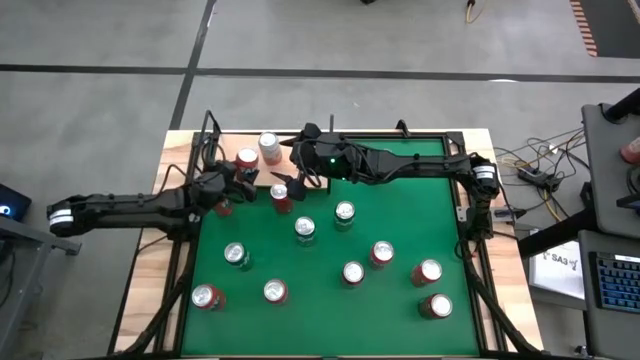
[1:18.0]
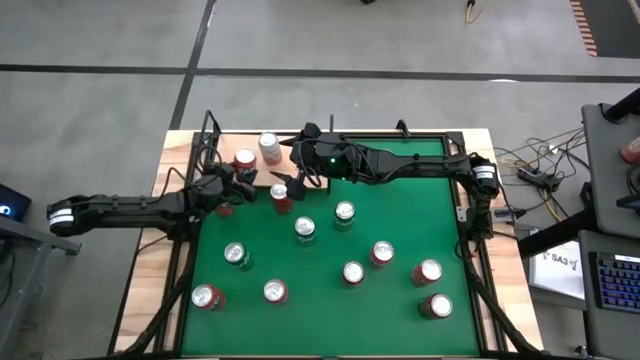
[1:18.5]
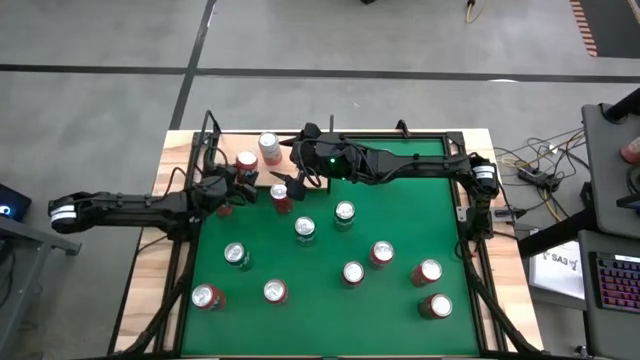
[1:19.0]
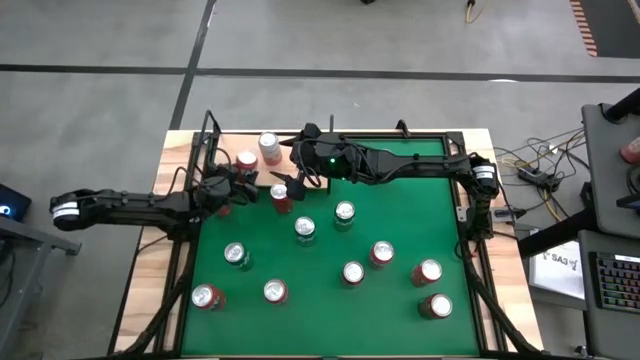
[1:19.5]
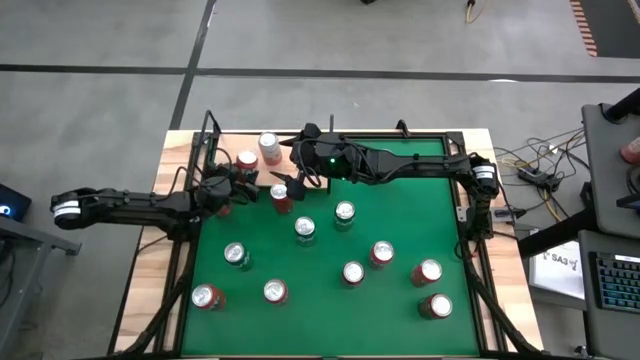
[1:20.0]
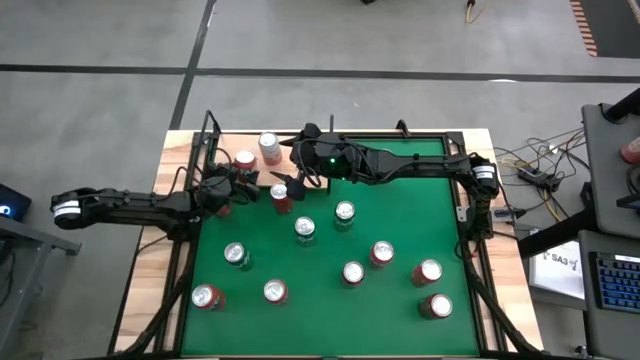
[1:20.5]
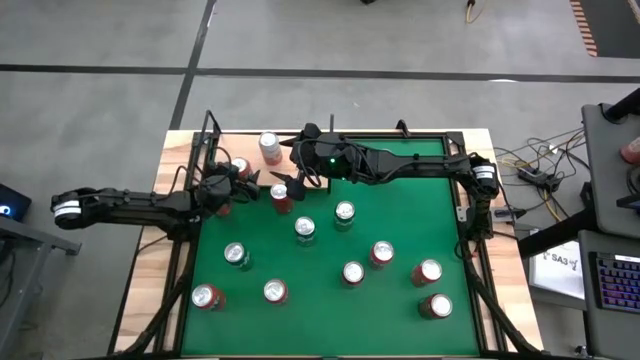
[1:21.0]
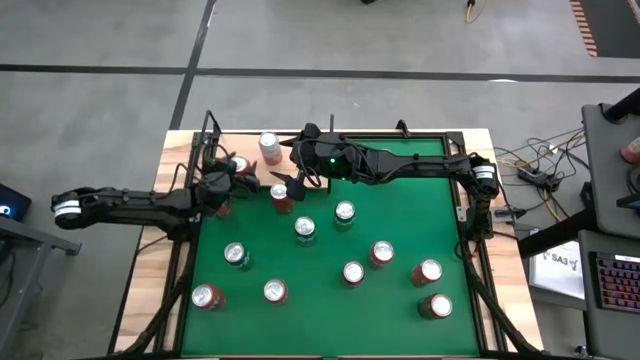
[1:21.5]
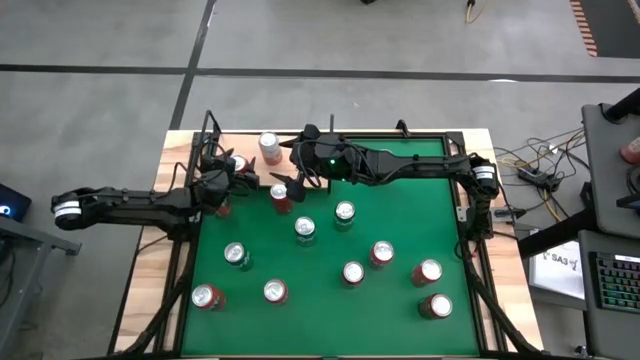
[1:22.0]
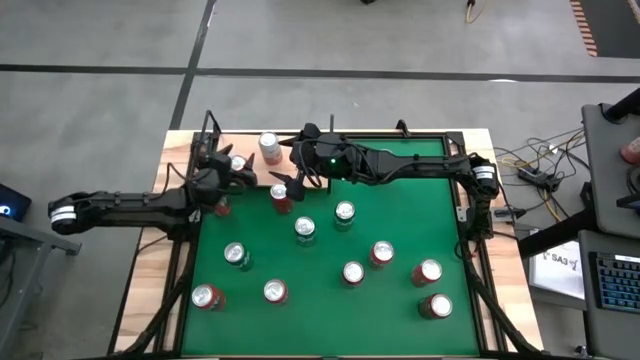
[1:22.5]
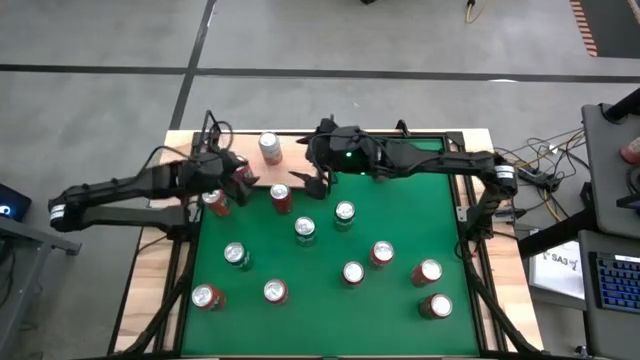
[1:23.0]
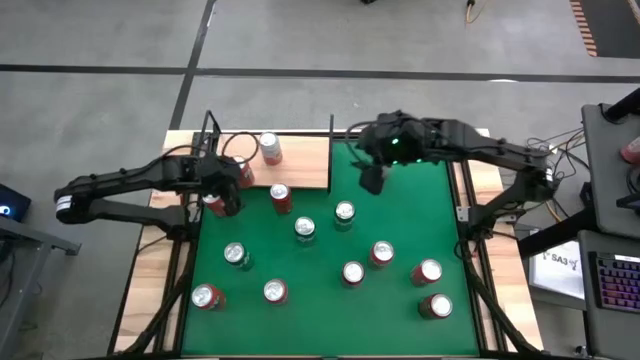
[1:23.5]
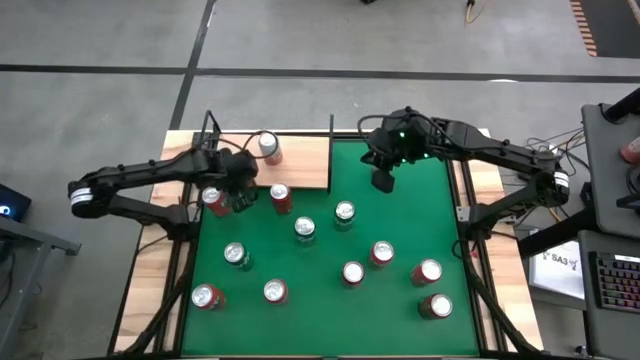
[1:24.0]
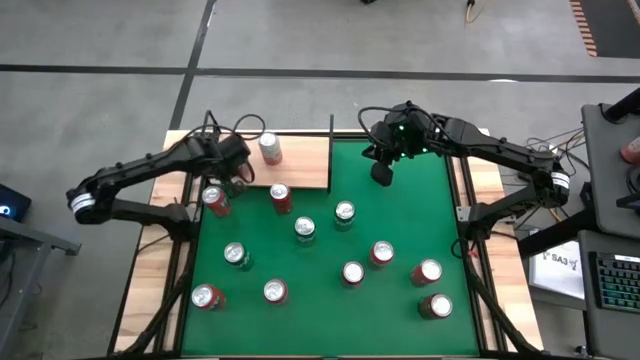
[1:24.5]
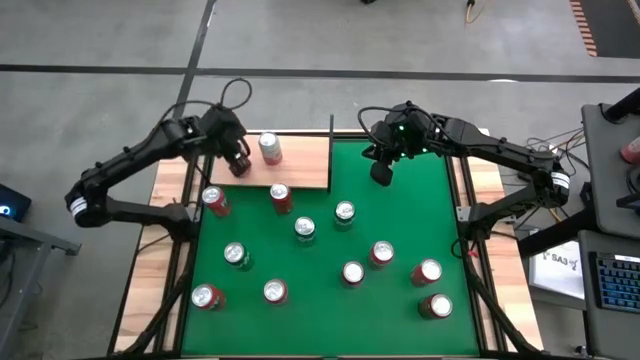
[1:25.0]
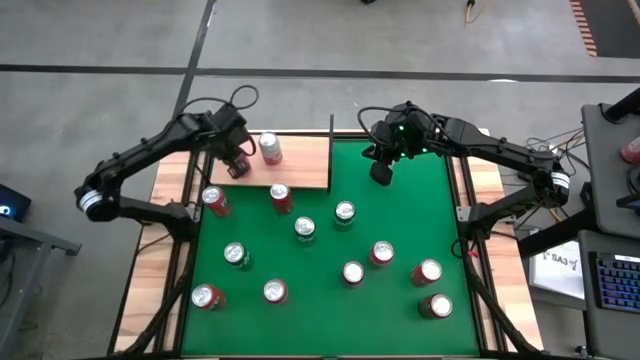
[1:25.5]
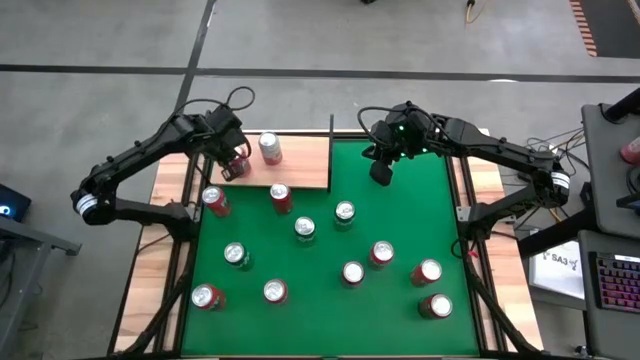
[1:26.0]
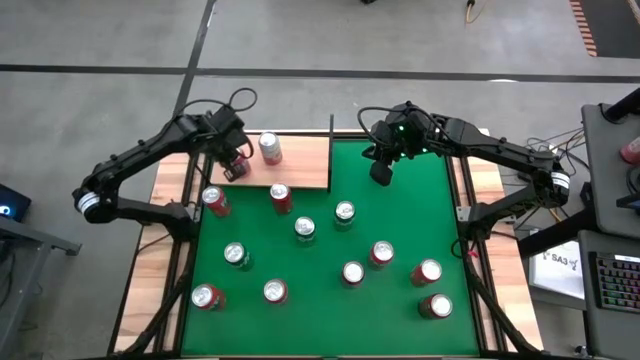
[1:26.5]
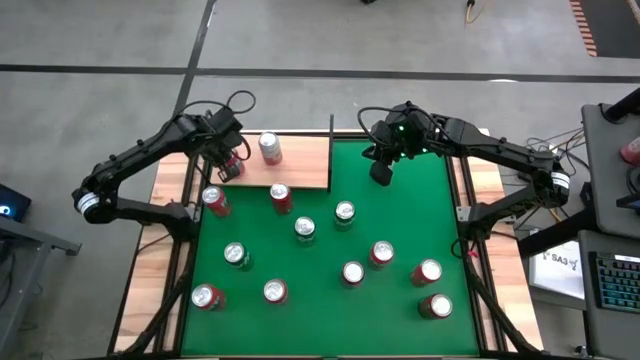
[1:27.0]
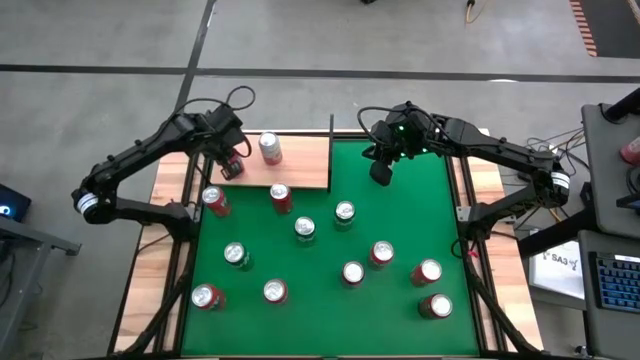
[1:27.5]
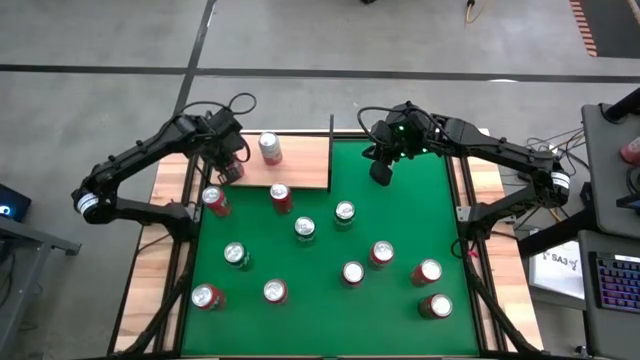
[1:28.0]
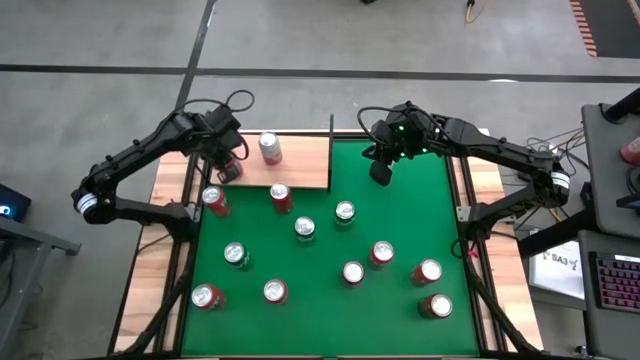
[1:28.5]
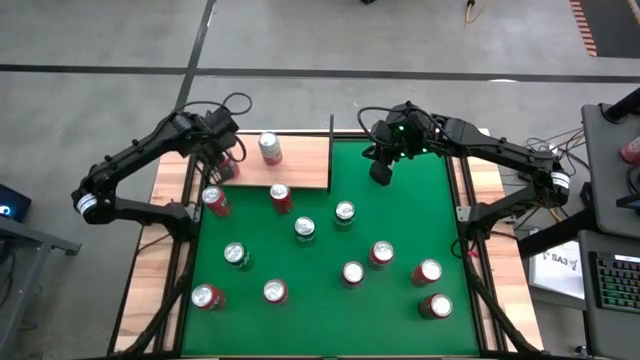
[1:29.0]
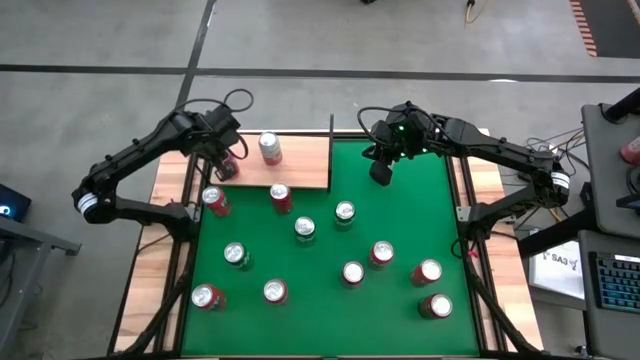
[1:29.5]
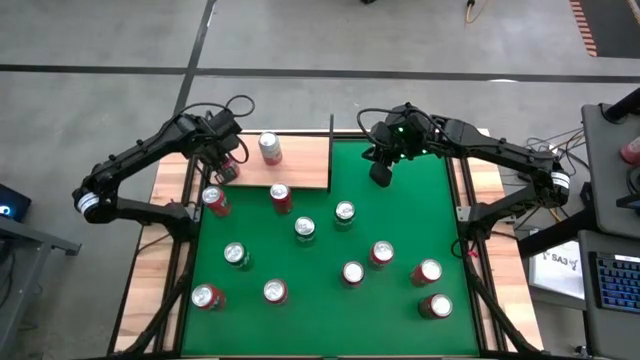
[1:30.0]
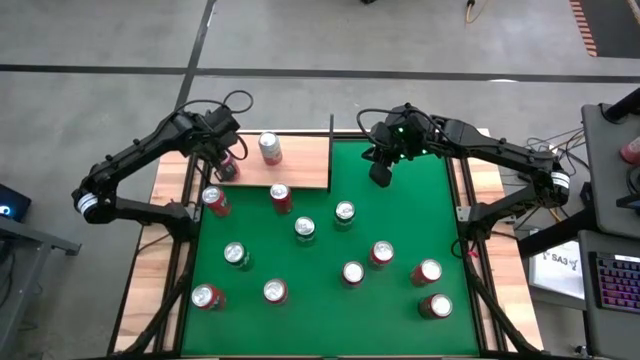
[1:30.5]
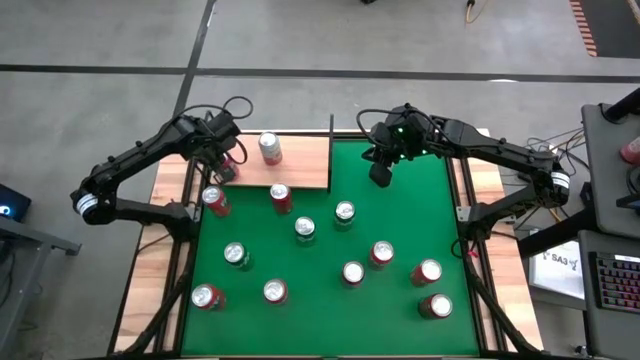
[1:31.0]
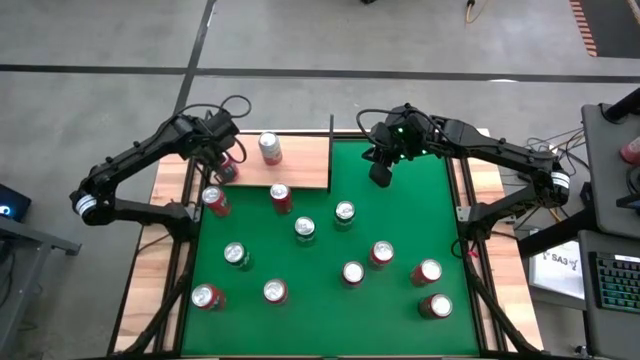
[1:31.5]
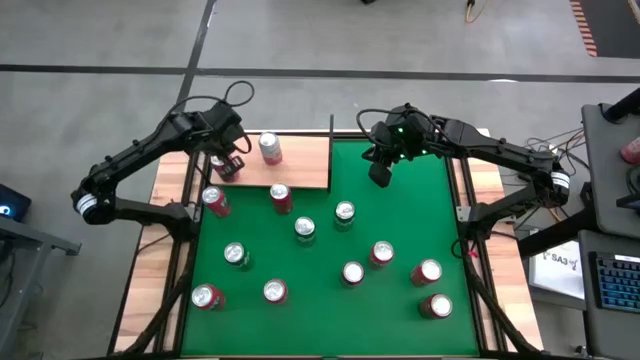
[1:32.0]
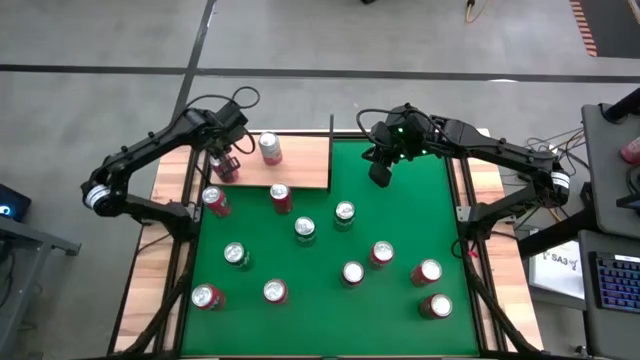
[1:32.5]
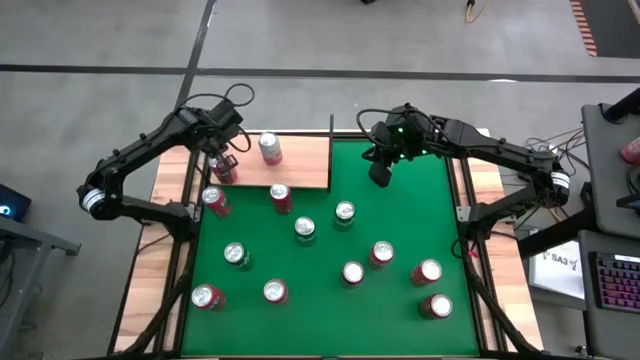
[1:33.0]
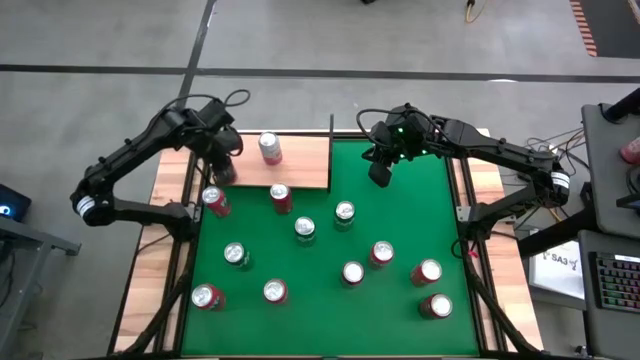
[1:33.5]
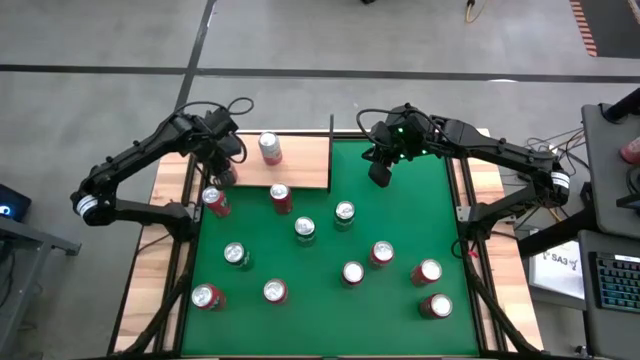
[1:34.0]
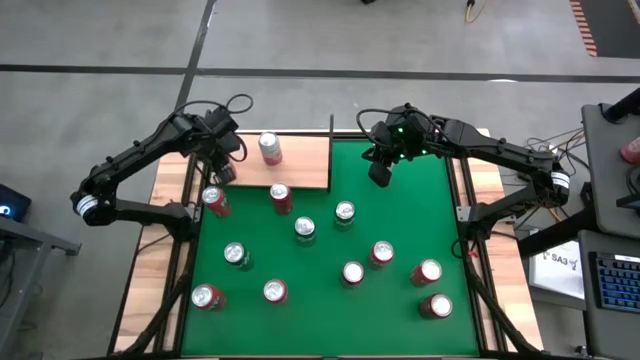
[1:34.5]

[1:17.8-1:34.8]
Task: Place canned beverage on shelf
Put the red soda can on the shelf
